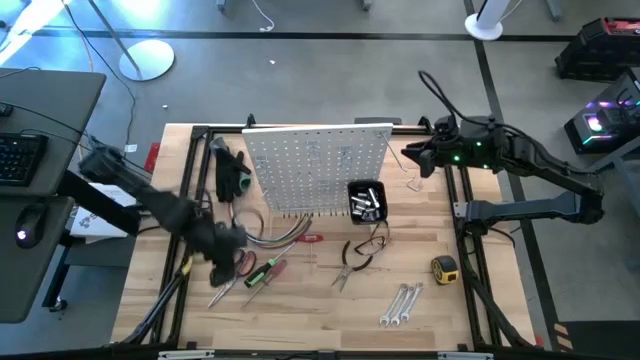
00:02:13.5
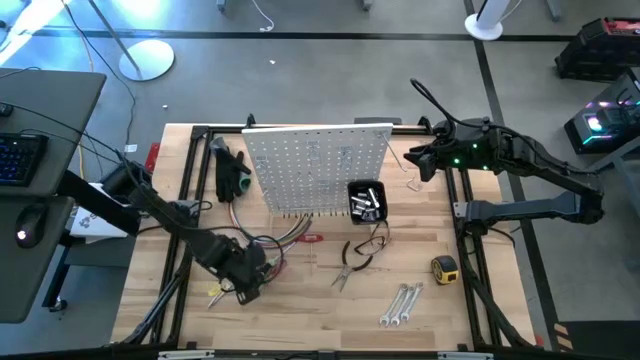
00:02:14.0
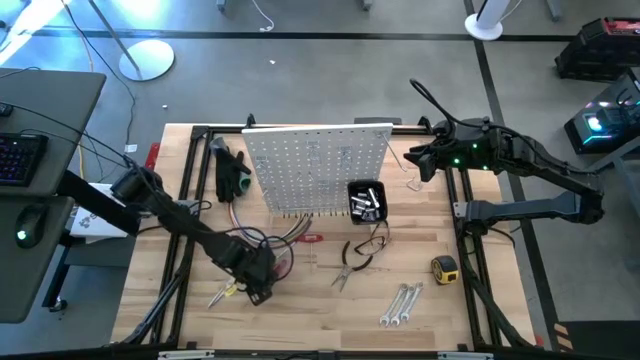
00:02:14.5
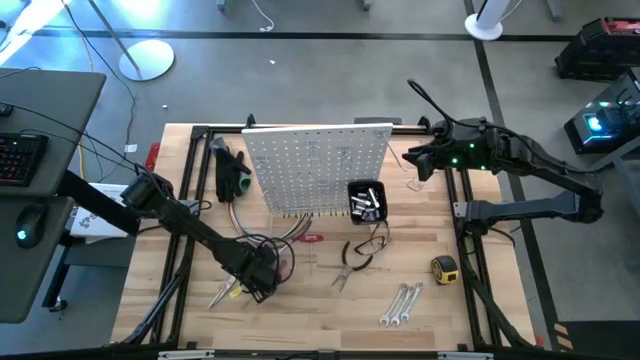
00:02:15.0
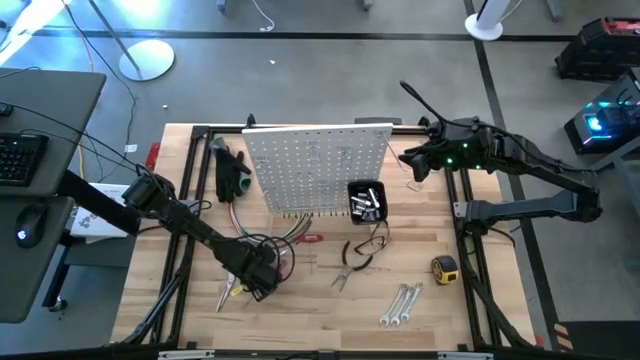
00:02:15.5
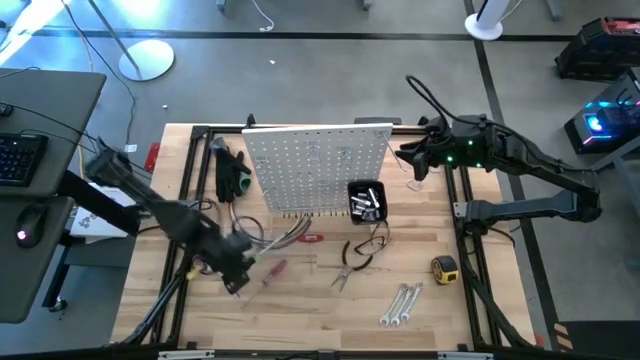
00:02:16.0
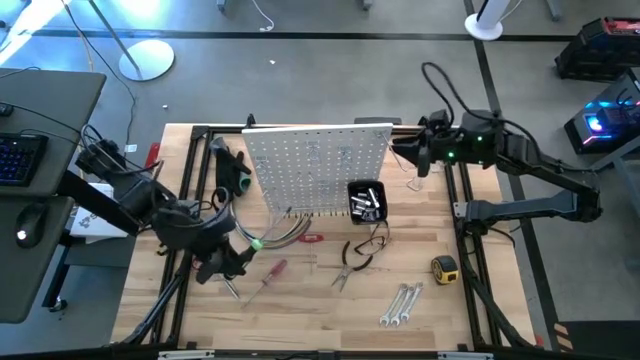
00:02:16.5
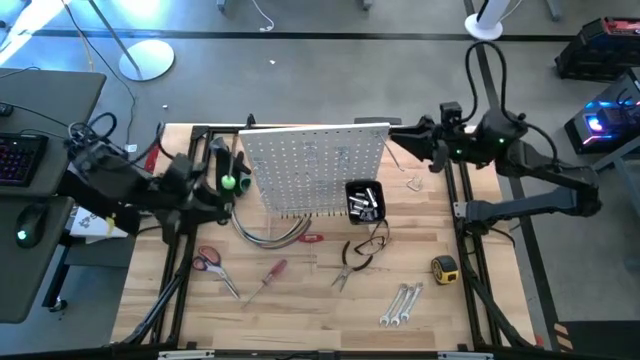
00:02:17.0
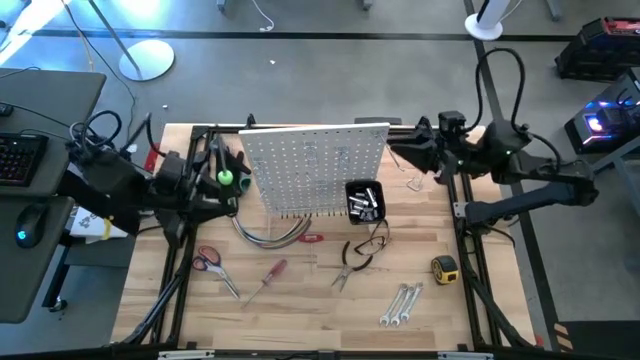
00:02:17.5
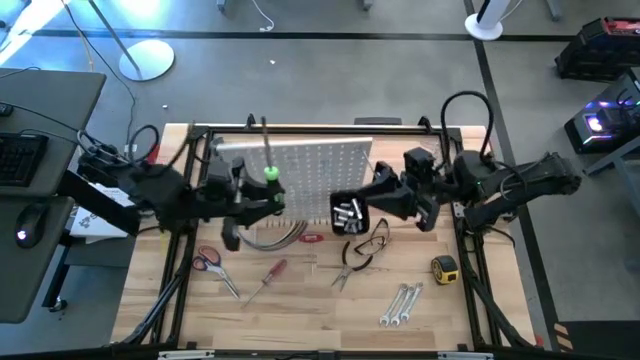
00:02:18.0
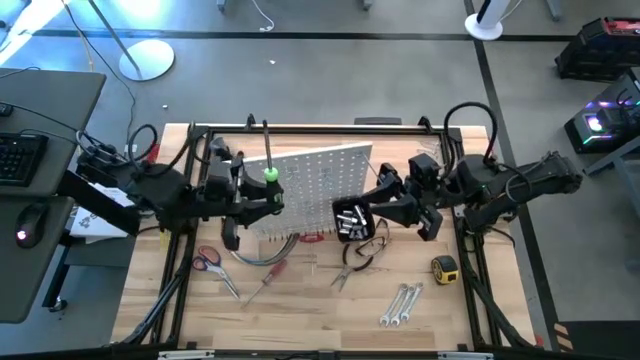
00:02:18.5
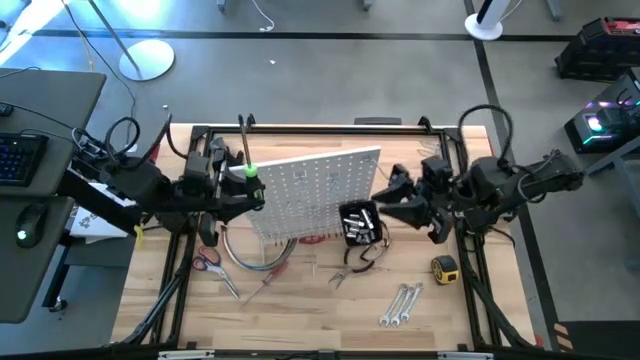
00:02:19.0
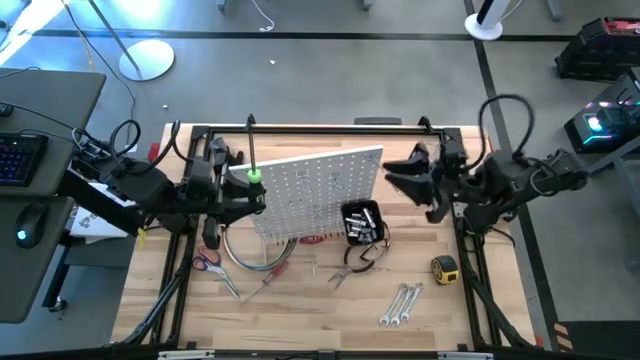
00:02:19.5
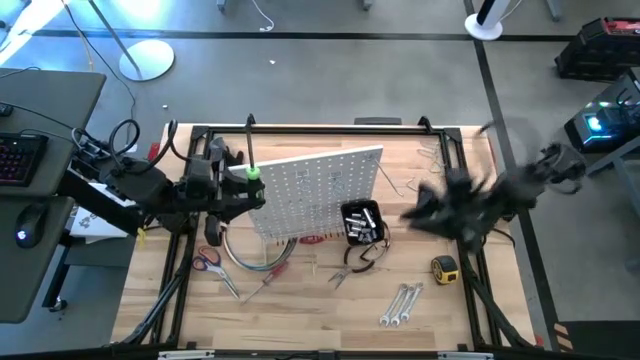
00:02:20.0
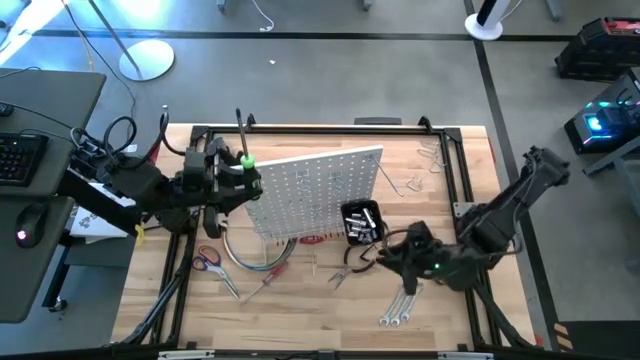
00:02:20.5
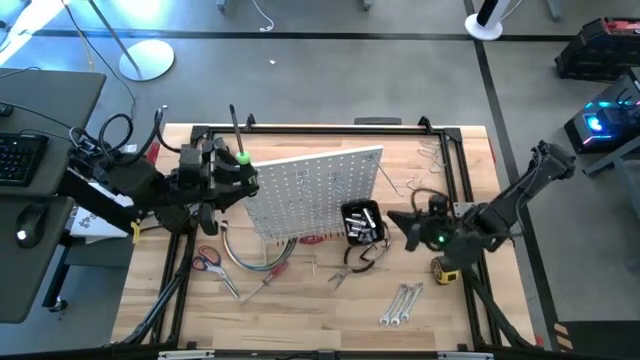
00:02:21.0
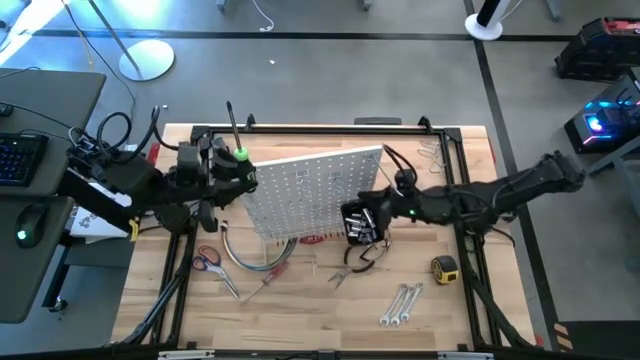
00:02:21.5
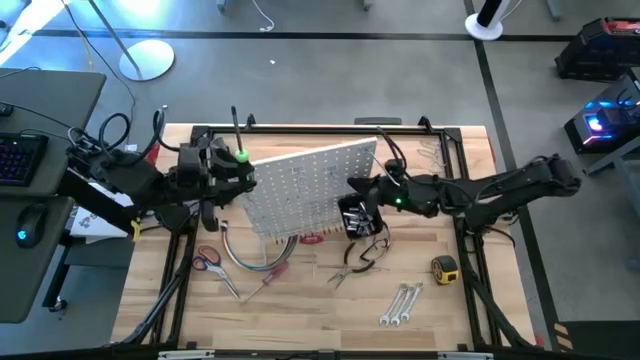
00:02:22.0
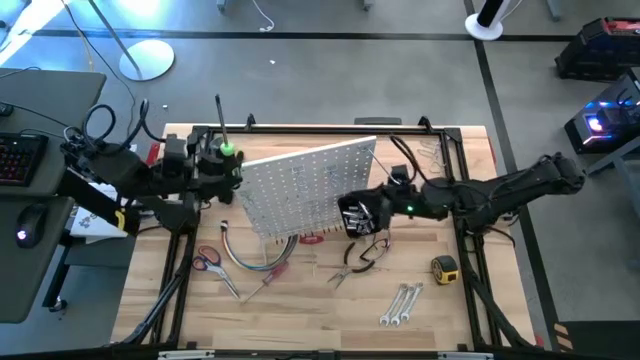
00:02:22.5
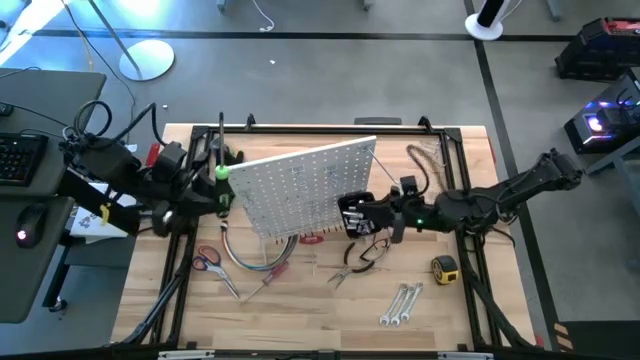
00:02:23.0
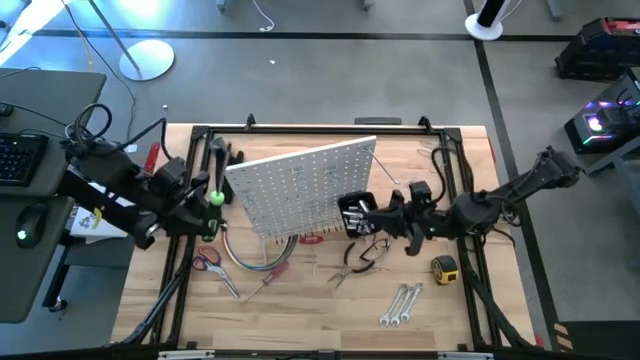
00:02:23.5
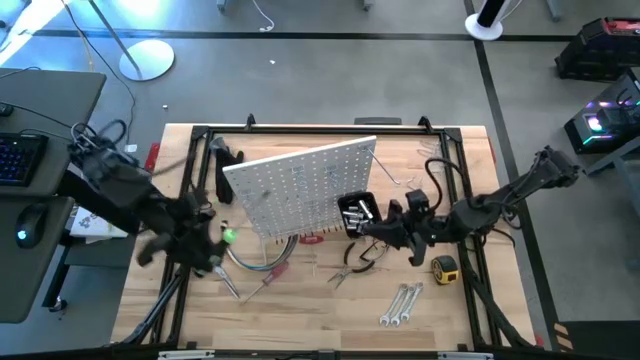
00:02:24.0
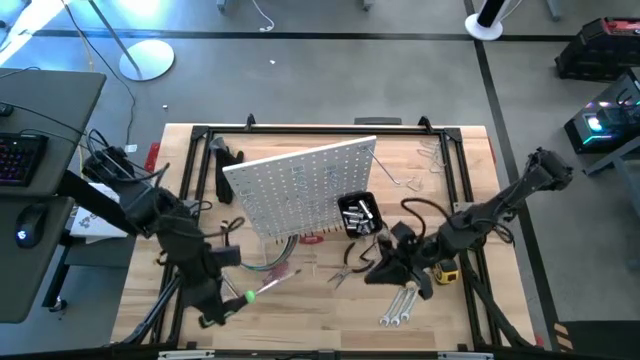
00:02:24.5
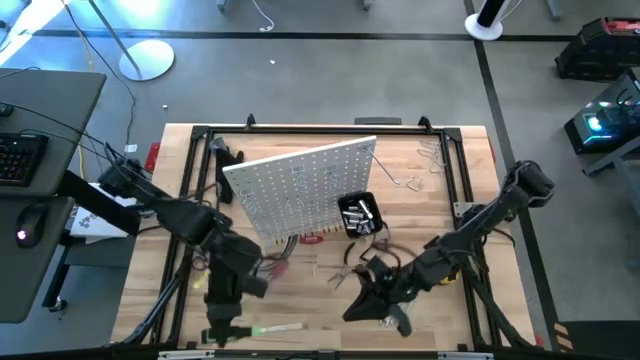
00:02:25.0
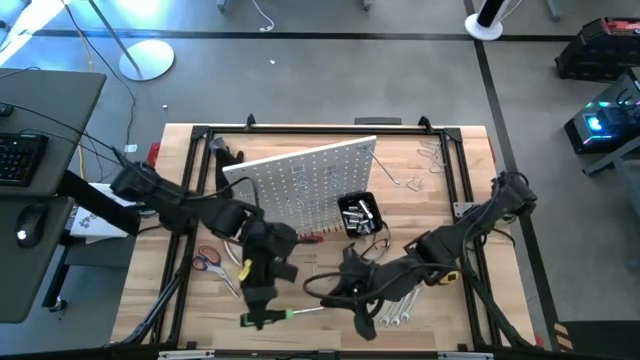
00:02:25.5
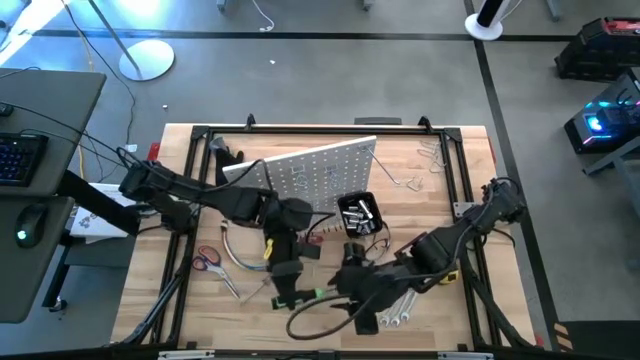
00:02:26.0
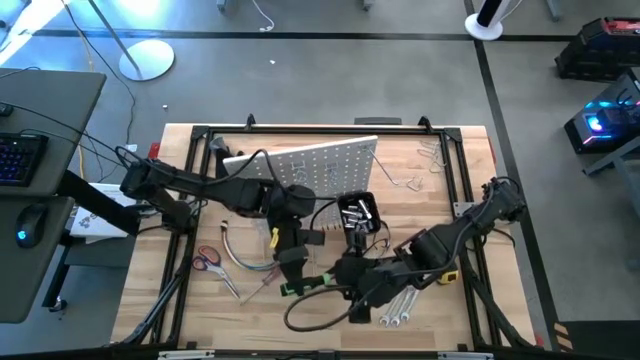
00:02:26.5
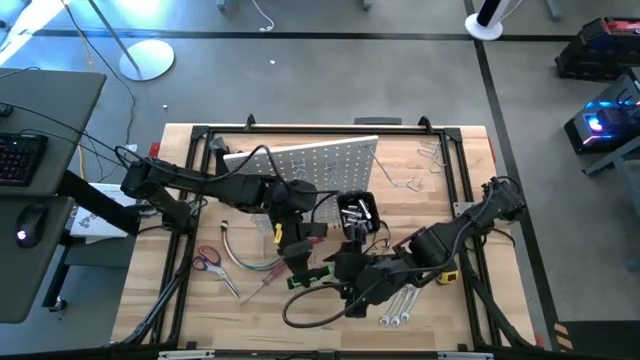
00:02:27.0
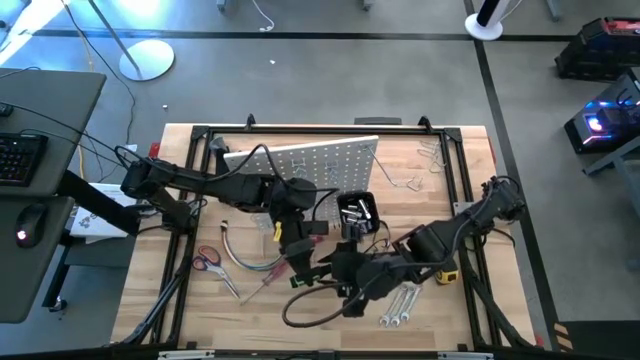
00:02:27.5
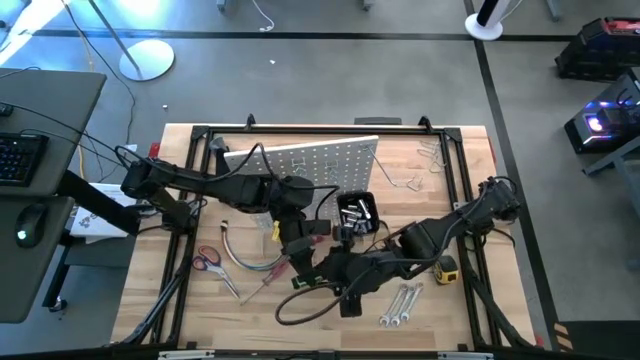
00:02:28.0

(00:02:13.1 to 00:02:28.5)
Task: Hang tools onto peg board
Hang the green screwdriver on the peg board

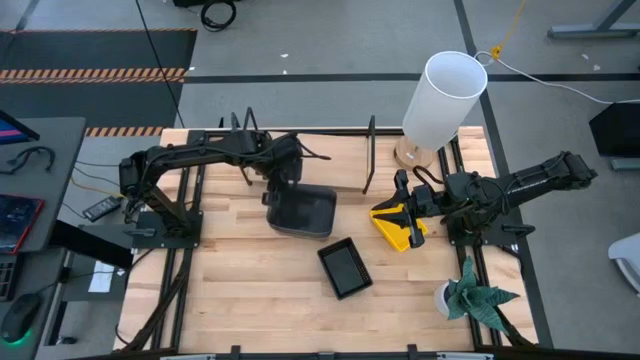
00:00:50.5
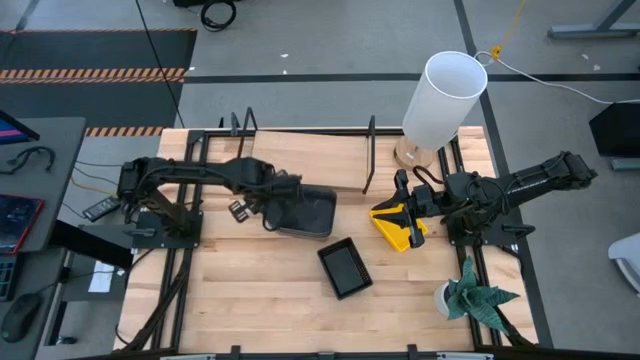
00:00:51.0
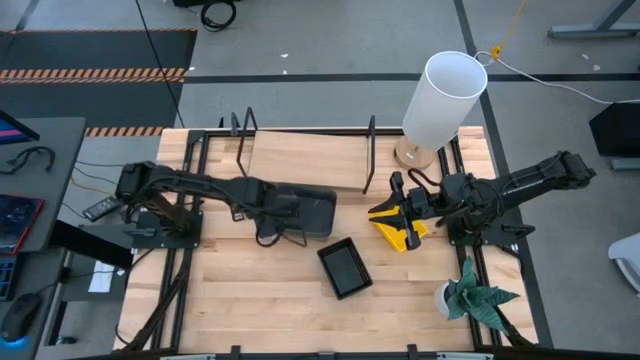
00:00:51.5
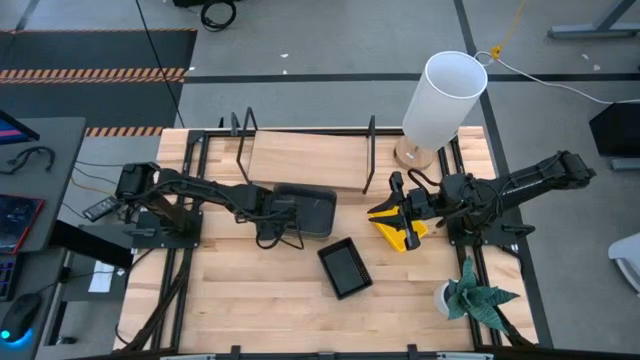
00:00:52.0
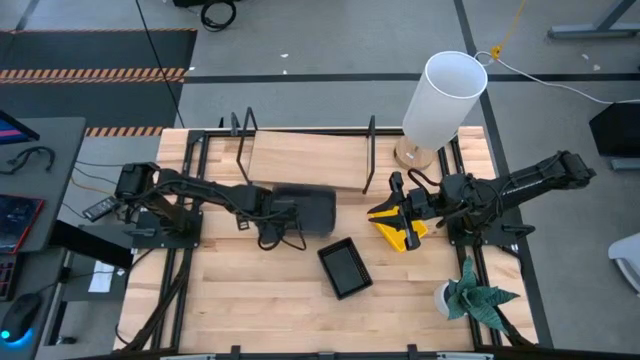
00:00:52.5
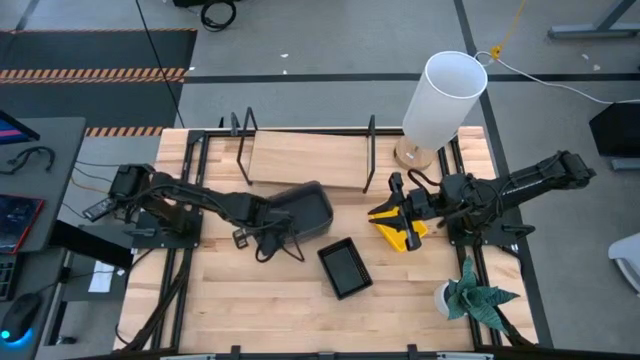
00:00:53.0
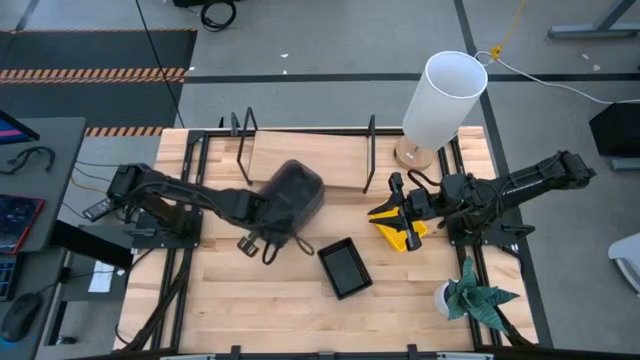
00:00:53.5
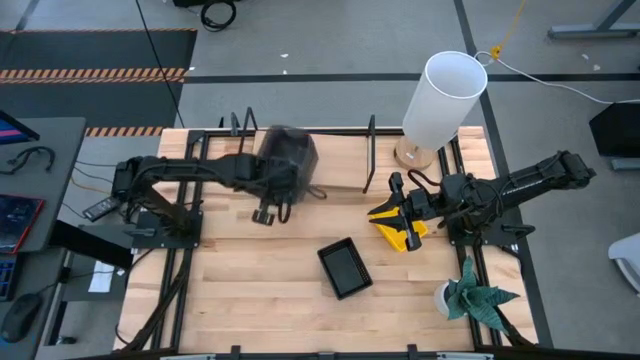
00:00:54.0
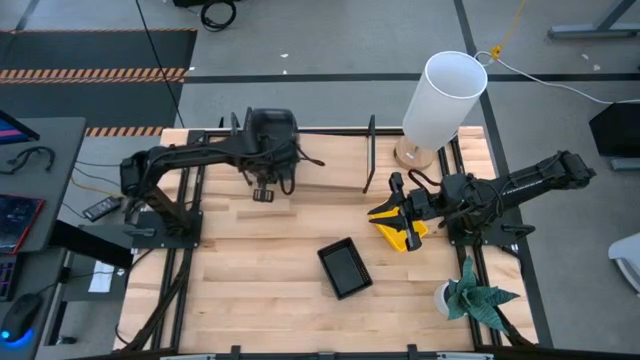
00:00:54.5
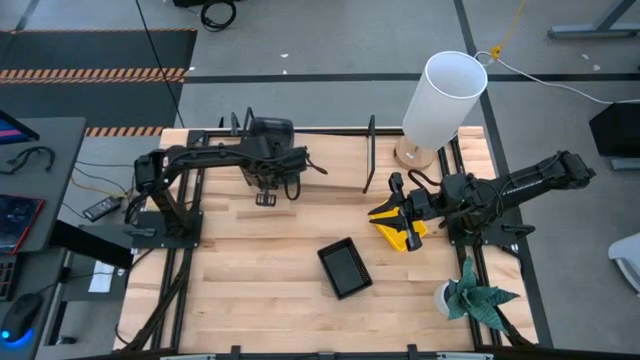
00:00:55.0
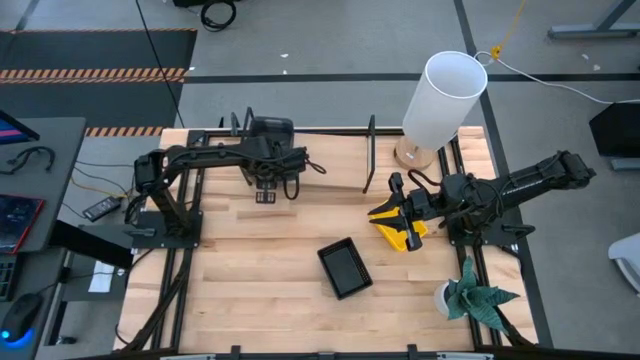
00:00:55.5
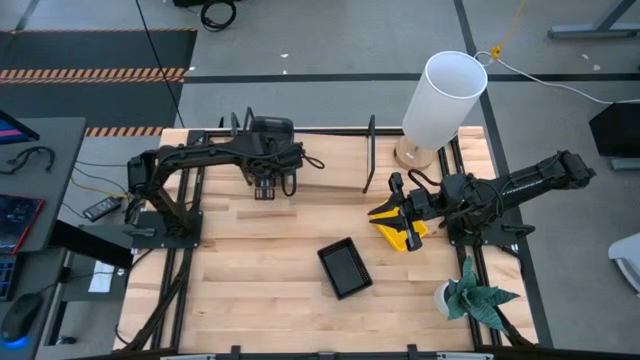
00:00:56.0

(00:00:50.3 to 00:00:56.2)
Task: Stack baskets on shelf by color
Put the stacked black bins on the shelf
